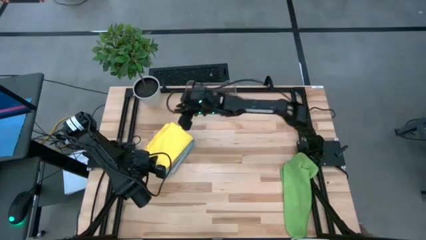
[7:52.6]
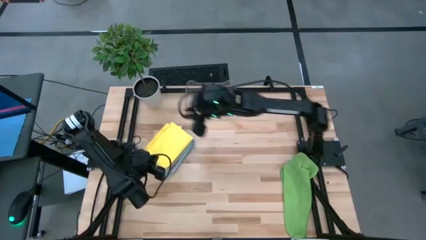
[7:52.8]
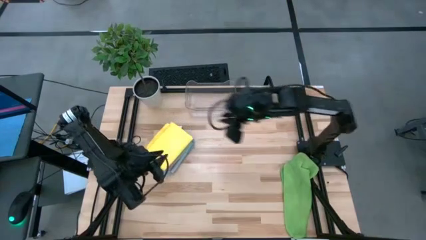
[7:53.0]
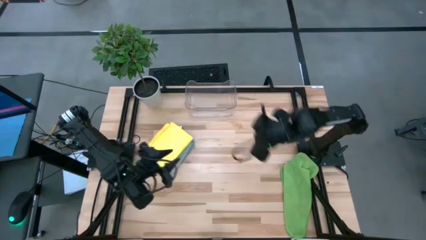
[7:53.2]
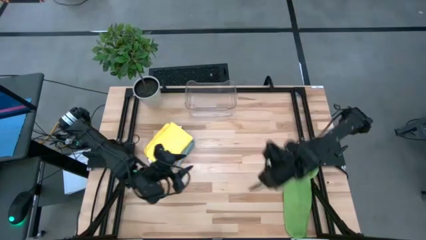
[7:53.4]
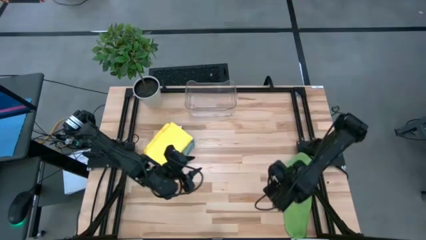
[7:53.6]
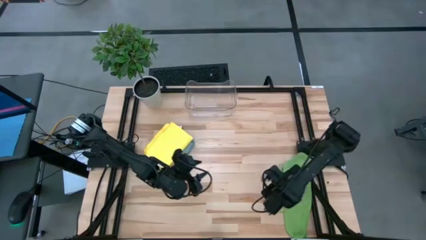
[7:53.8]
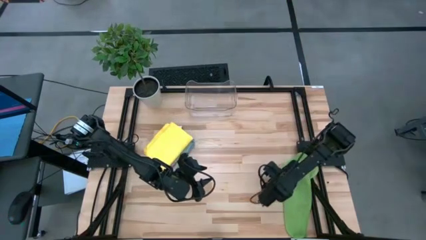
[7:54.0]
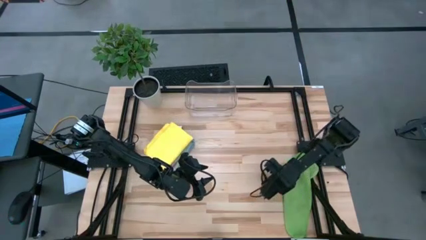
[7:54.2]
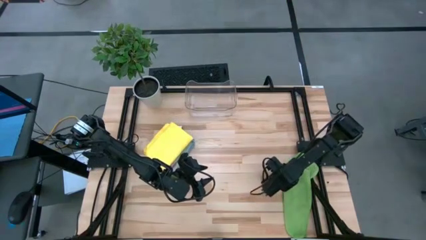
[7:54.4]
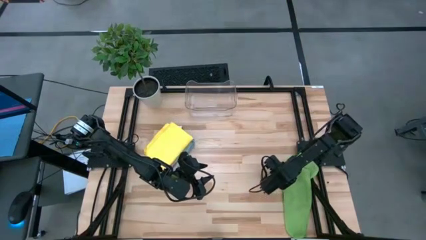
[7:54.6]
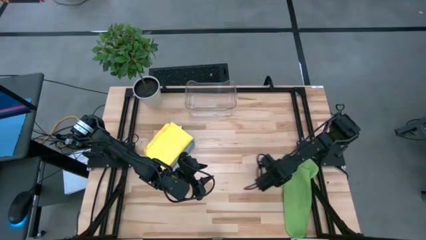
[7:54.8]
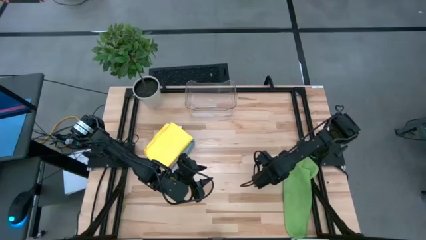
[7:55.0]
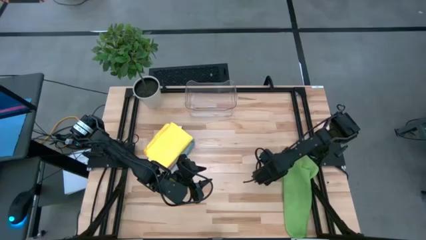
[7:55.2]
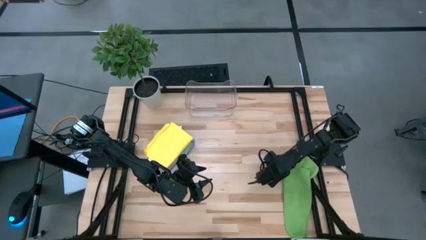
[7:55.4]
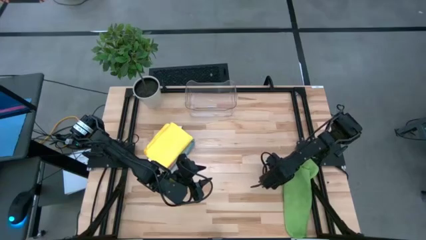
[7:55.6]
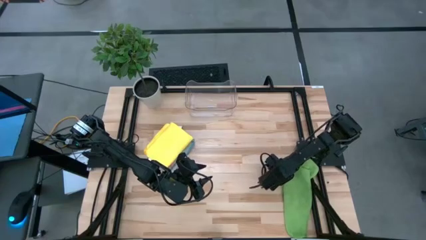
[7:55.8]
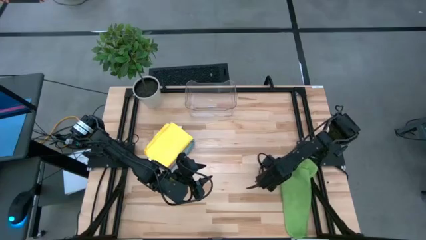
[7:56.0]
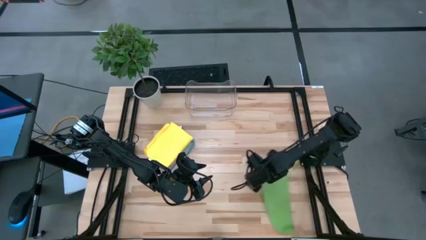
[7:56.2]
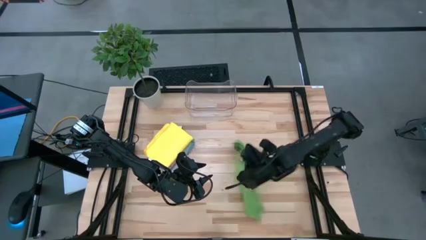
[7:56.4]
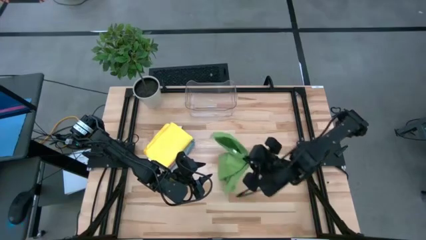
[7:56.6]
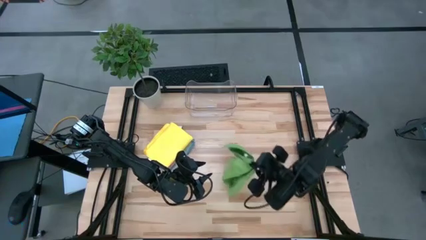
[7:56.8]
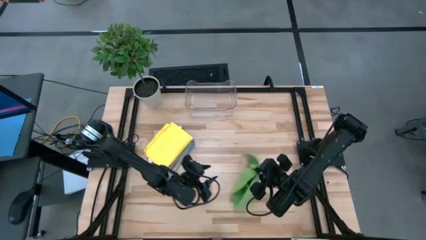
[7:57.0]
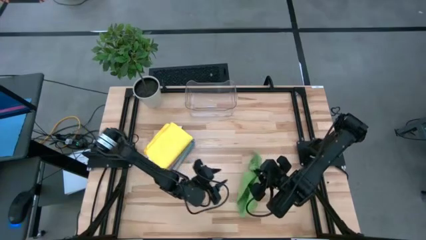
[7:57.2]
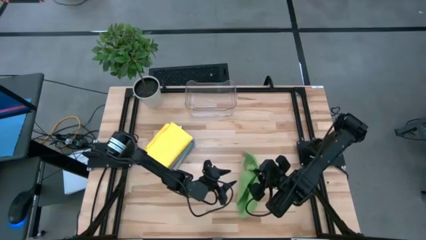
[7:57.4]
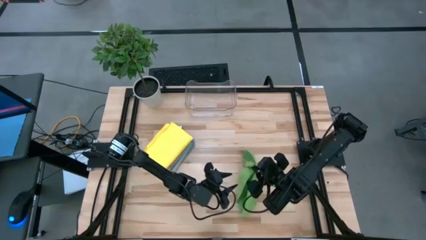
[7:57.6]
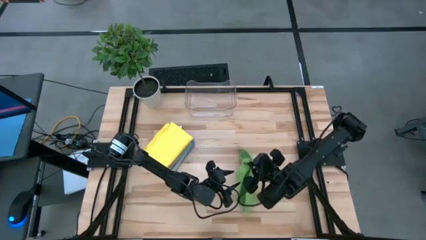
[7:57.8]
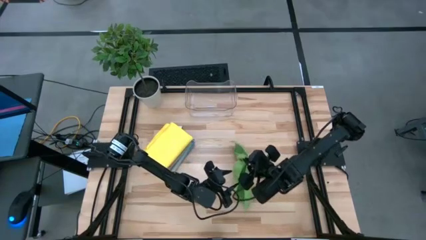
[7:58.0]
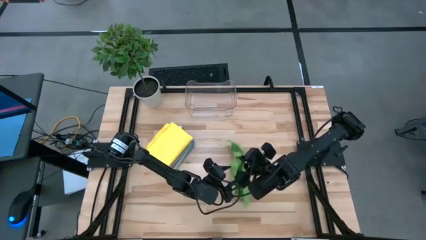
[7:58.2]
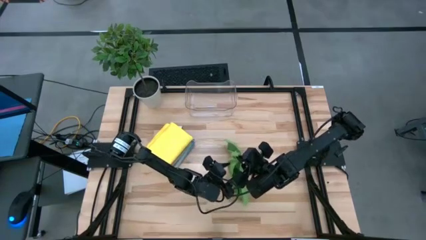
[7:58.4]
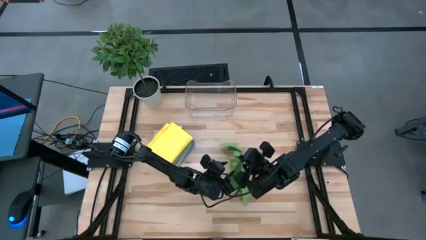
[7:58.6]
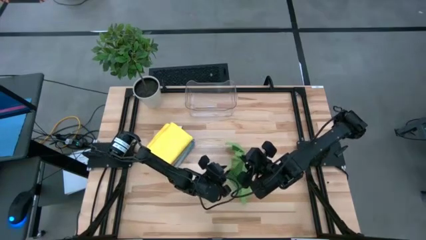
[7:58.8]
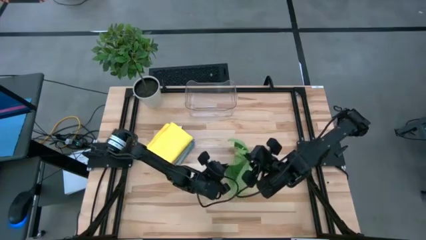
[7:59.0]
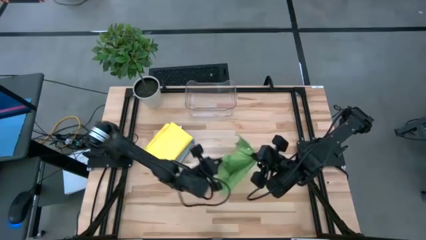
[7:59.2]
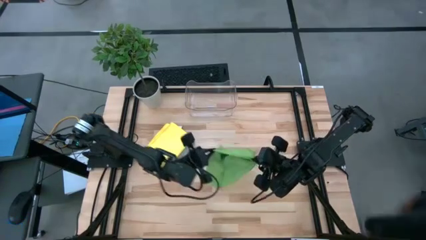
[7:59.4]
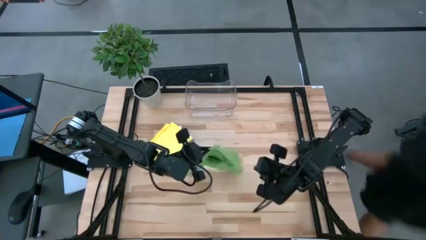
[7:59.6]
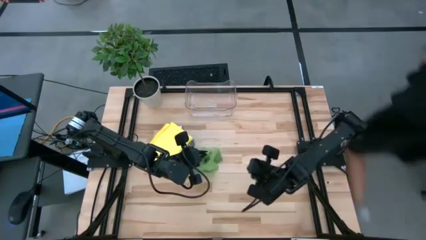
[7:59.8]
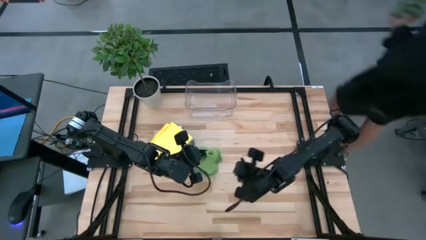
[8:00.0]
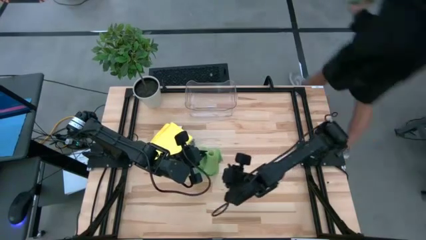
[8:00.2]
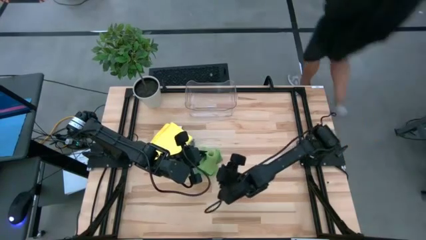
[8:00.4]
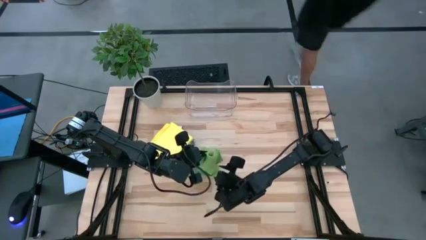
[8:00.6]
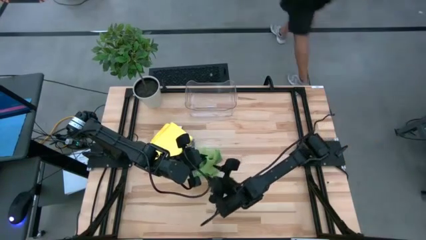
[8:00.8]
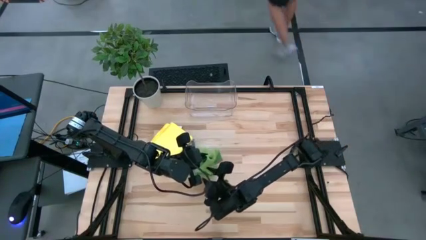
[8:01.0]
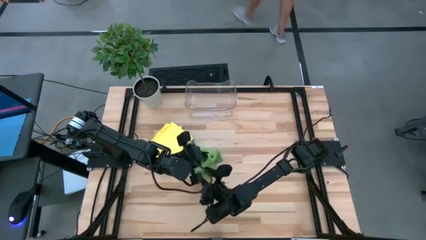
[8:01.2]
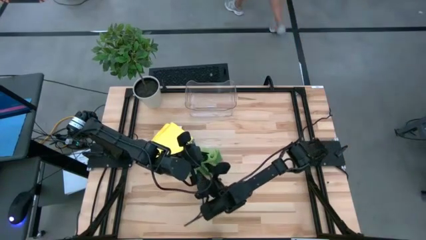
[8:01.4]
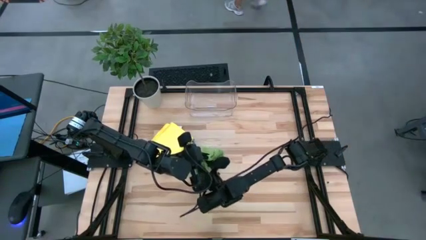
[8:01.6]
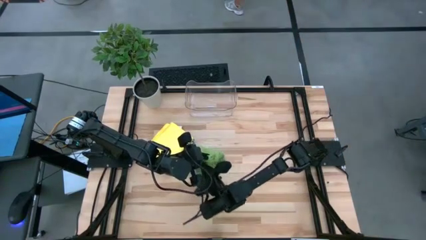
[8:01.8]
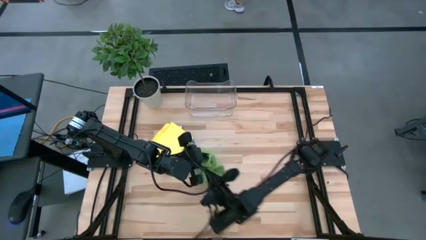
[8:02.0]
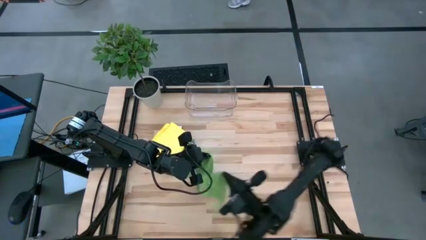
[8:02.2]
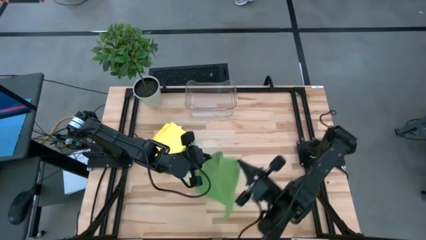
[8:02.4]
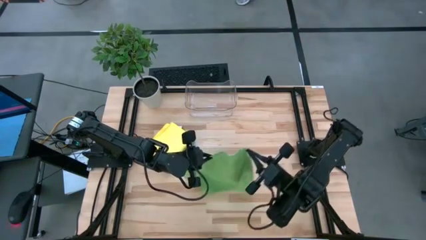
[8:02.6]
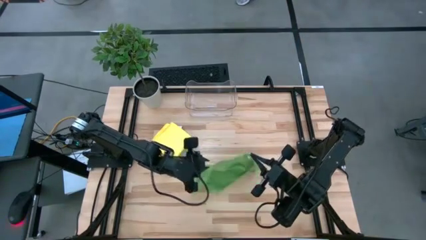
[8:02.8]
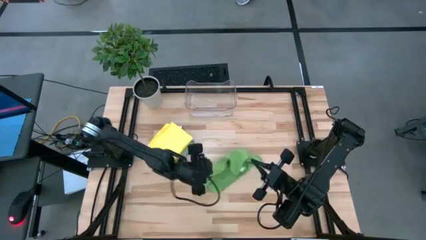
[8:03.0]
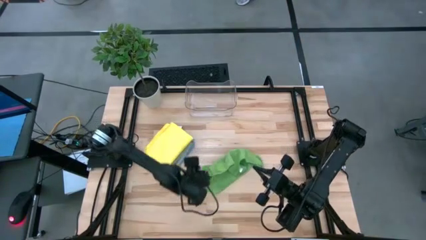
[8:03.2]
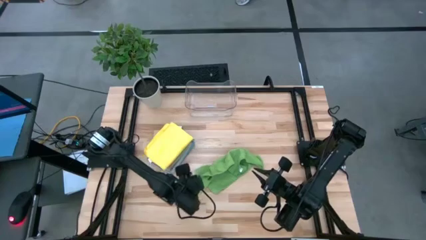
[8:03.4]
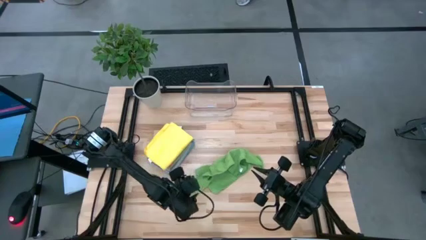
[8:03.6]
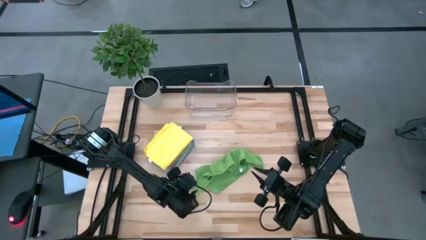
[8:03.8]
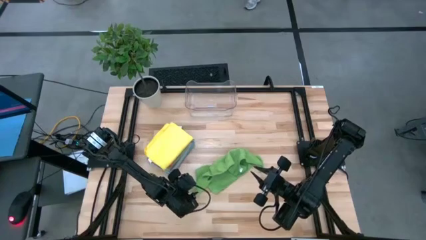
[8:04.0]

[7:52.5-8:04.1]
Task: Fold microfiber towels
Fold the green microfiber cloth
